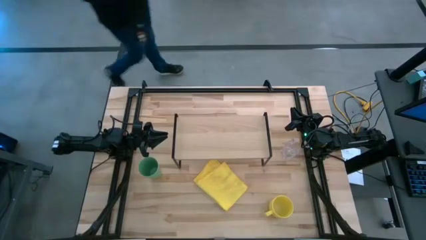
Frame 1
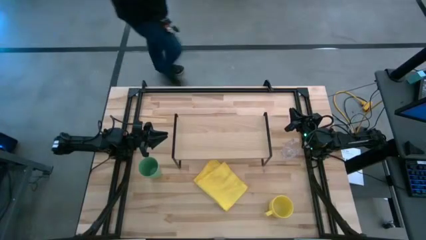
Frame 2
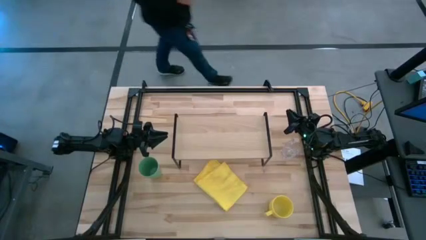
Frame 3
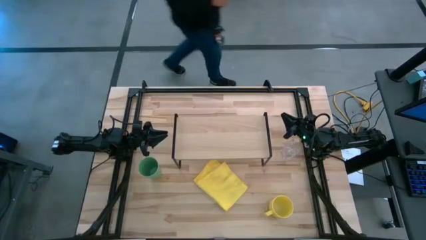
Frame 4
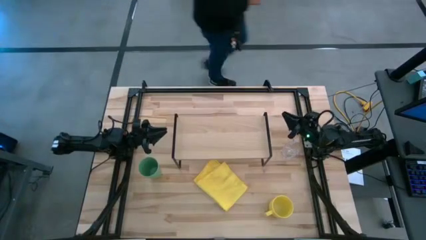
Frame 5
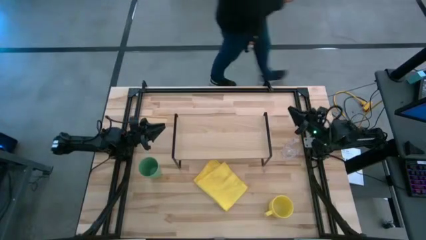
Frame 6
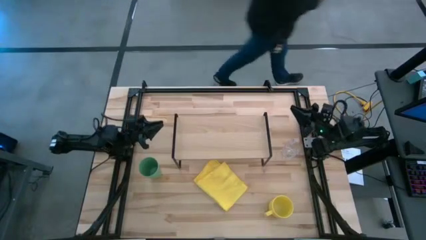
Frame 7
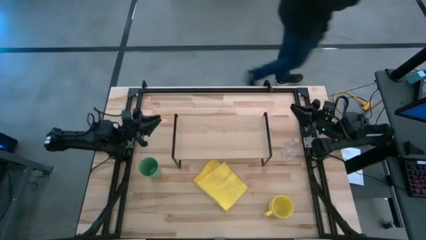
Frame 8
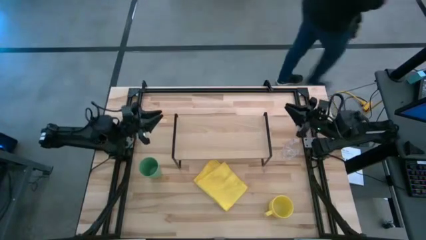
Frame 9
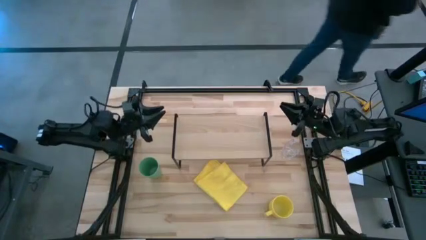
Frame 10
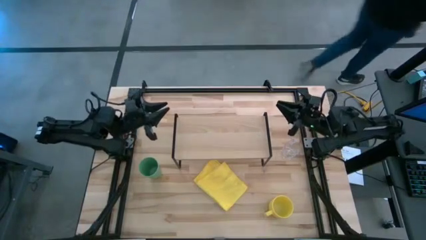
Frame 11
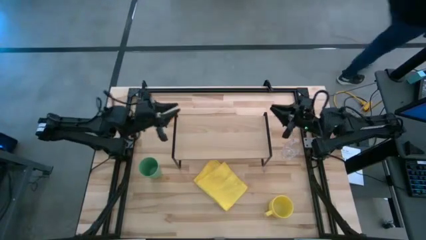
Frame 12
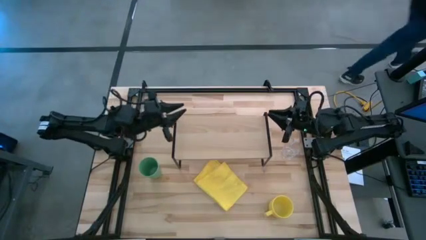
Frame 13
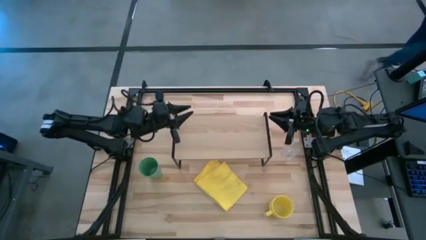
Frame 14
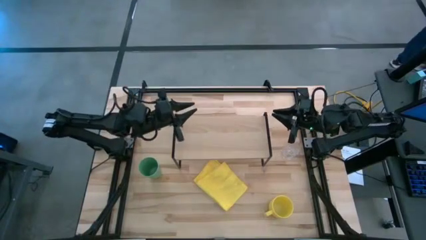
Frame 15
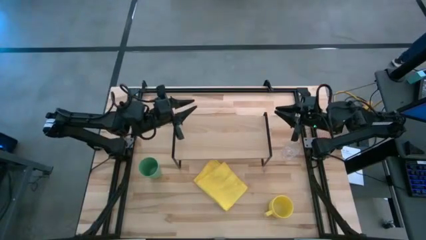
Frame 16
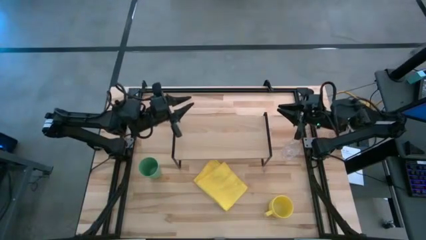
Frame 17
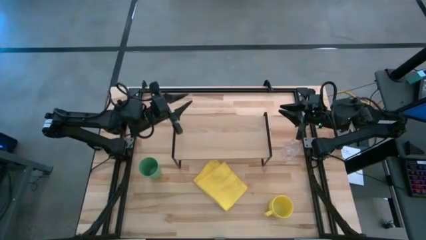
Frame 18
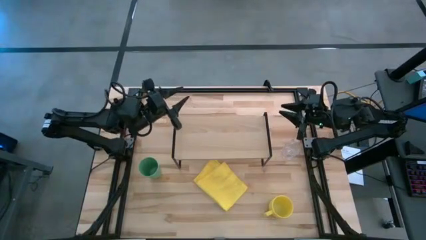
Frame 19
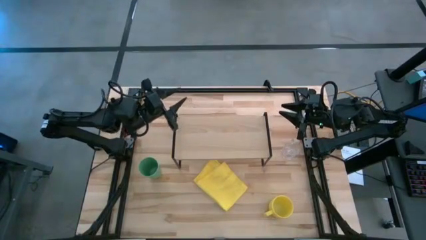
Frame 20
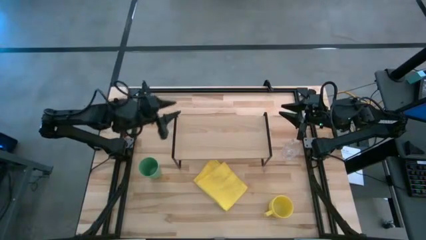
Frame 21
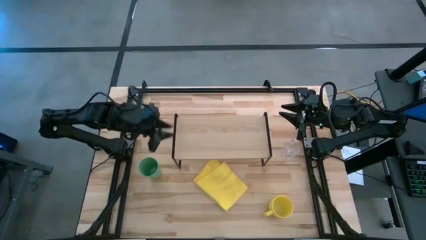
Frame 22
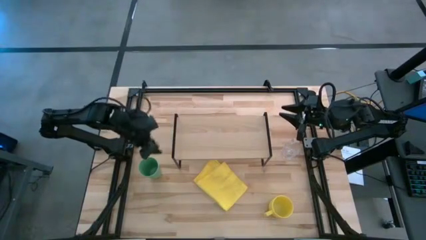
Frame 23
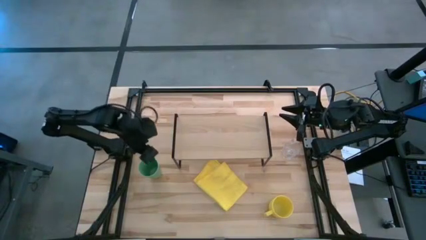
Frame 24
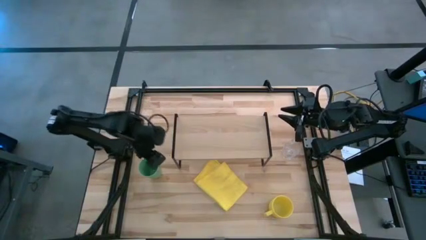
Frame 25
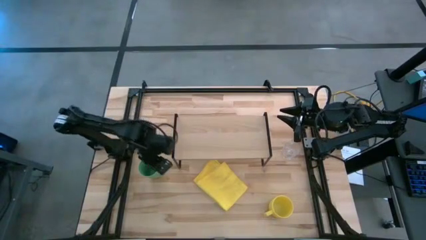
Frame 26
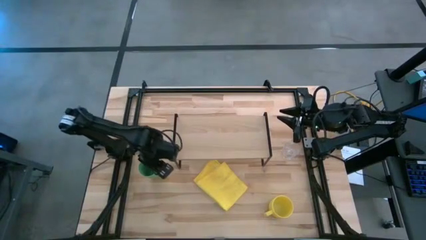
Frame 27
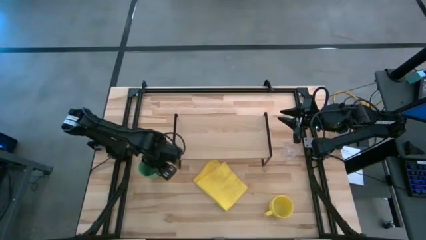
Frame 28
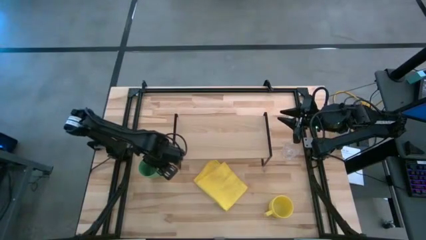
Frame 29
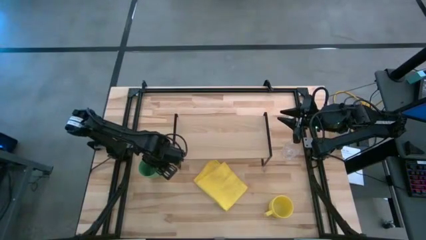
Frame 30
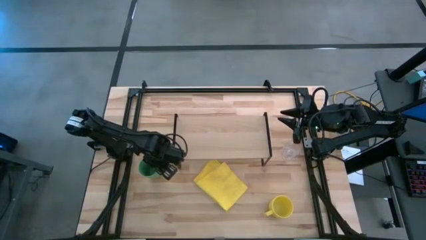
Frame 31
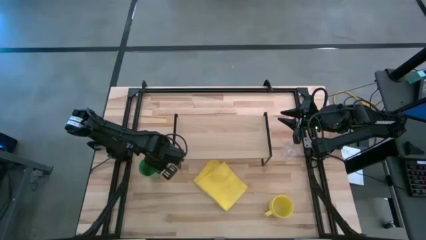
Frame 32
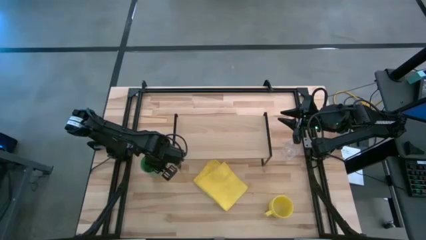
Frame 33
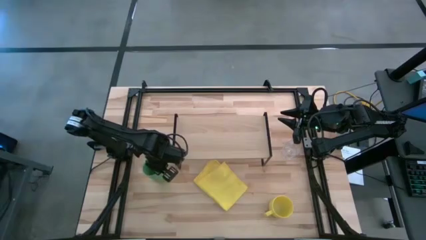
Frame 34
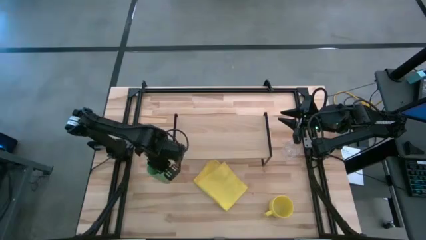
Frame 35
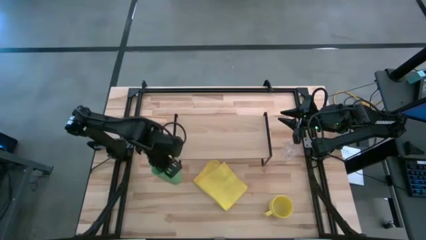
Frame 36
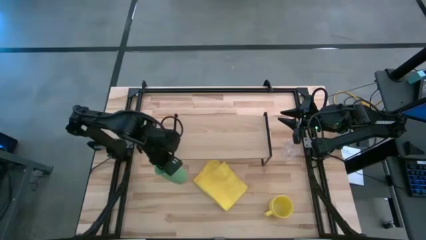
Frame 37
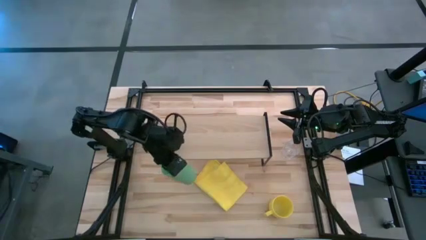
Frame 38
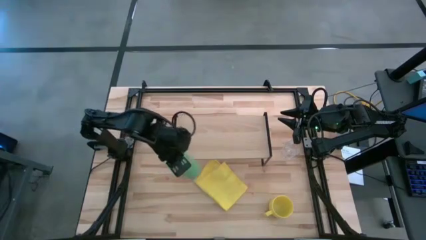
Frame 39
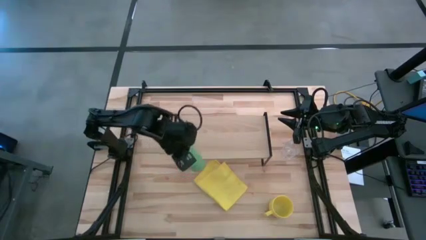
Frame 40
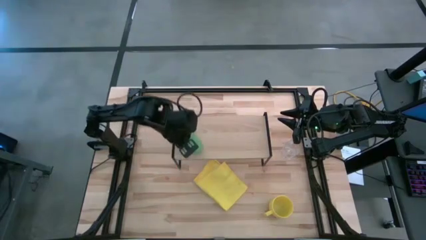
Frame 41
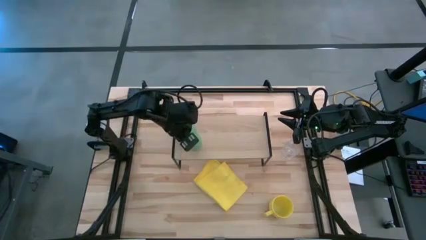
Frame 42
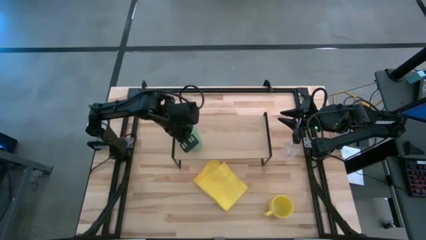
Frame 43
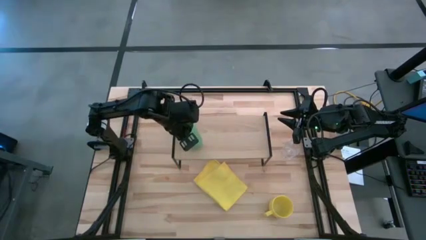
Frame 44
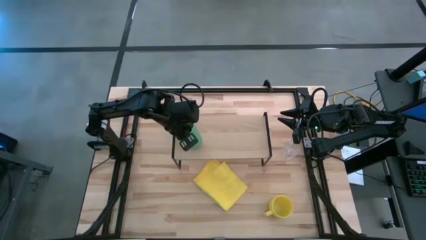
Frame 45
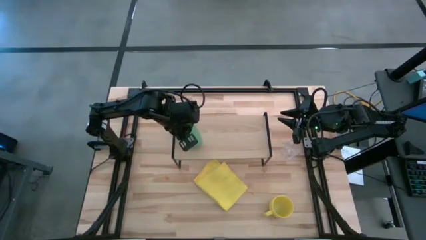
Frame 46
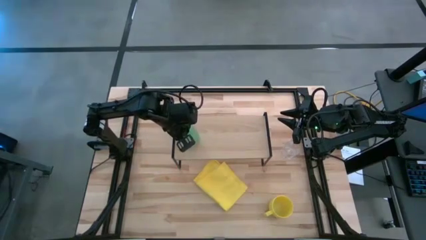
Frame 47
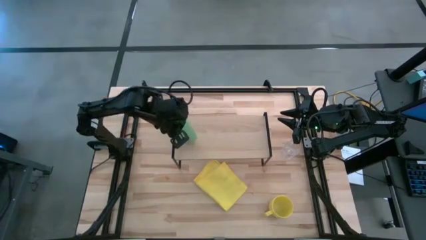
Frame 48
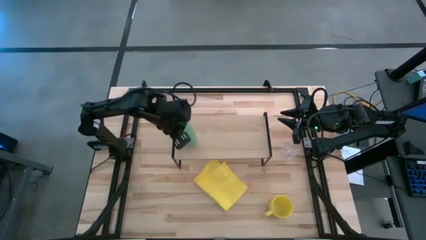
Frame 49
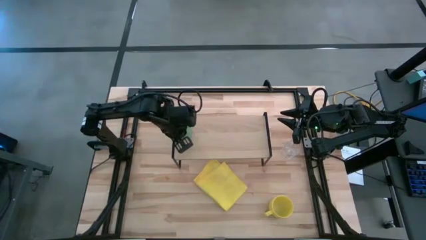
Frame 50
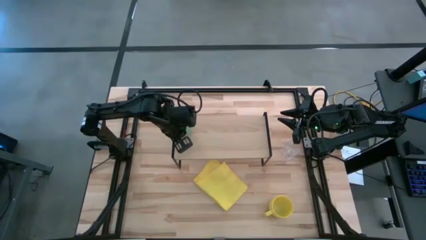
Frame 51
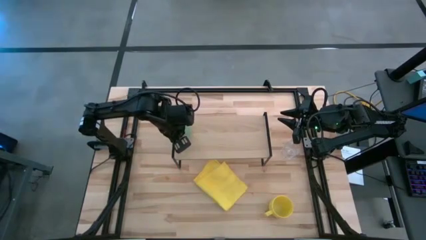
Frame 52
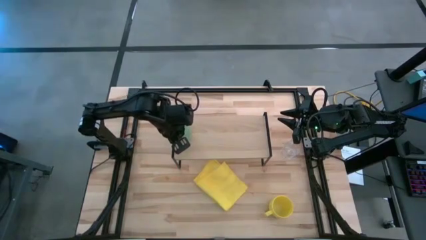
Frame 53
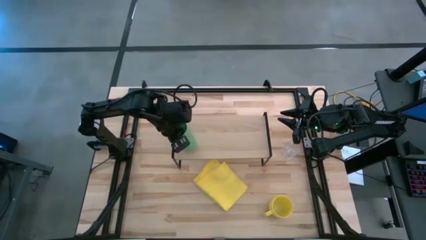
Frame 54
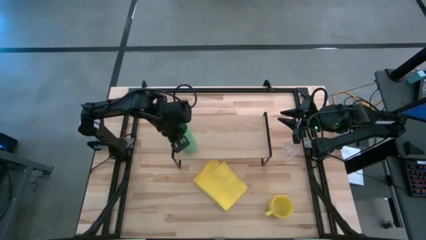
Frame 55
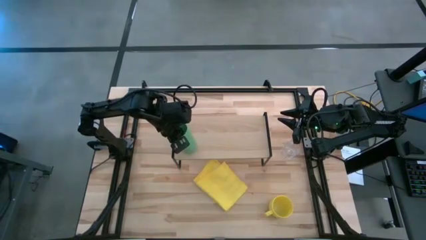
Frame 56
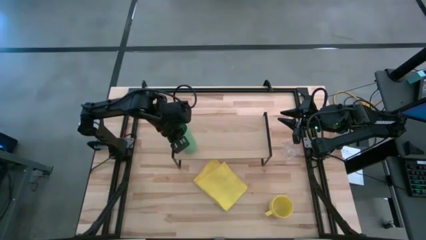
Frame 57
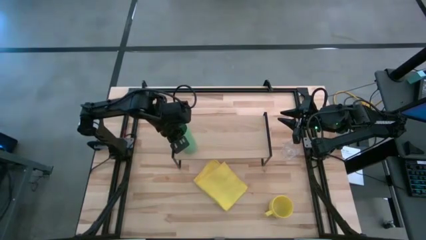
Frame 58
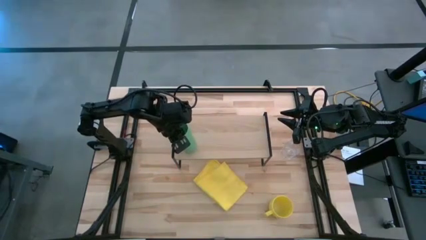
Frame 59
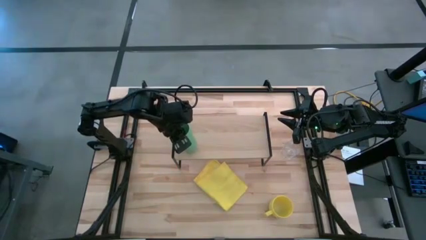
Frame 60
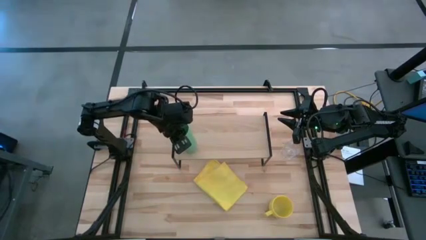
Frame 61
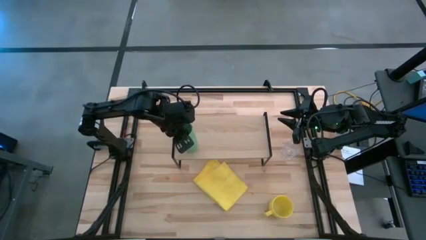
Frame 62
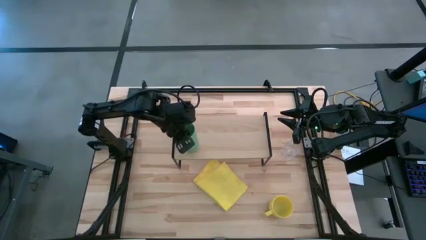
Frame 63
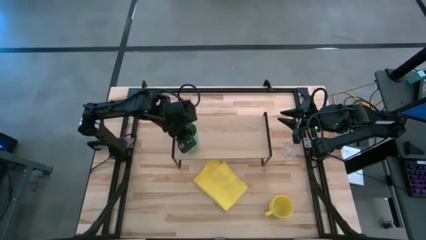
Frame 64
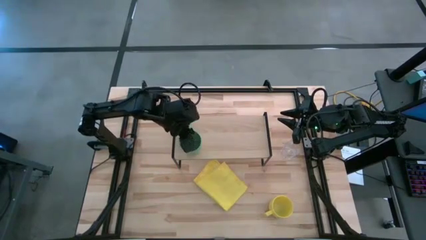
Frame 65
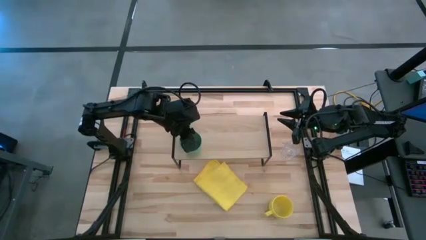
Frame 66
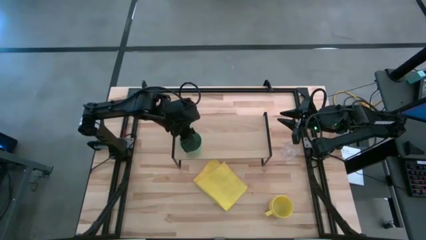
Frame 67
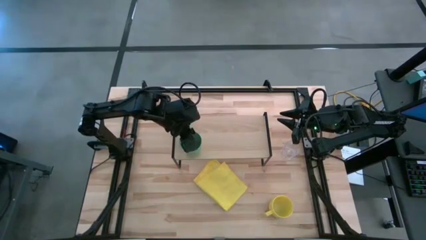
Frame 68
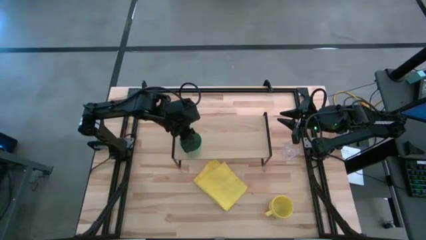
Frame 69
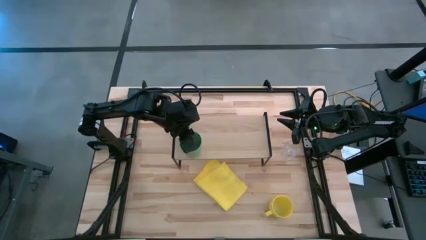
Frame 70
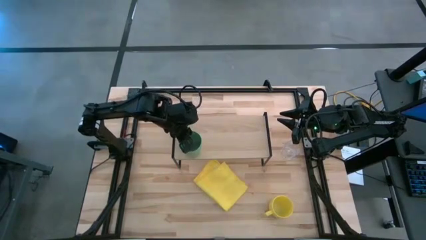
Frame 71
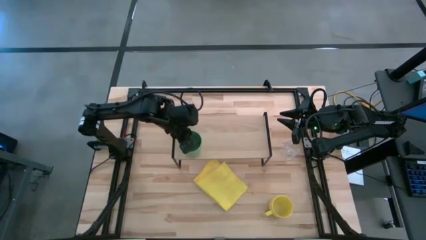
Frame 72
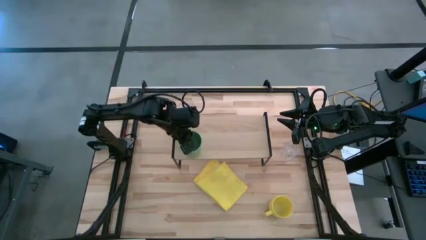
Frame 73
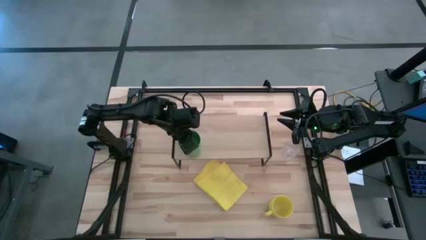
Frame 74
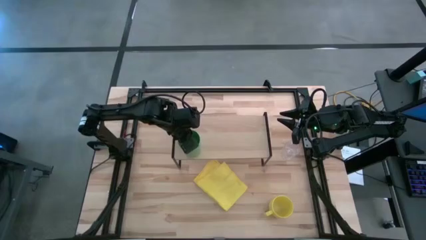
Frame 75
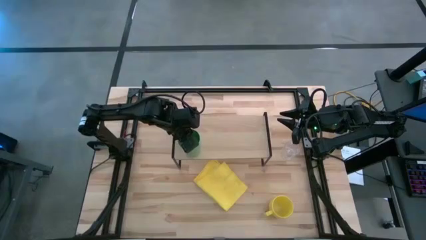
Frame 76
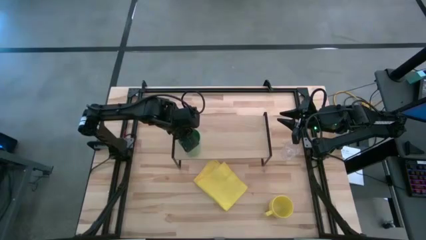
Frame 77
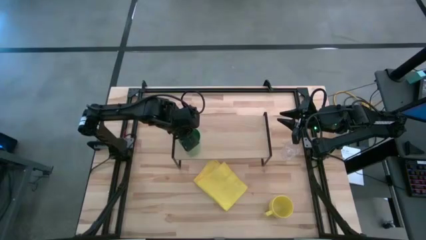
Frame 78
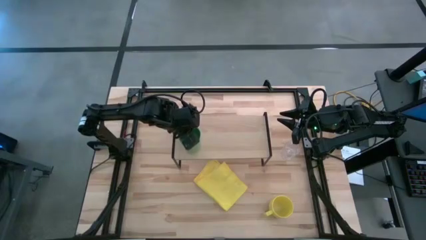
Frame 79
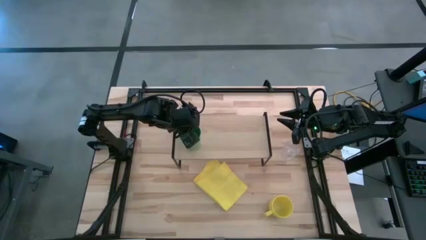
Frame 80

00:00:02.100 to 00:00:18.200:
Task: Stack small to large cups/mugs on shelf
Put the green cup on the shelf
